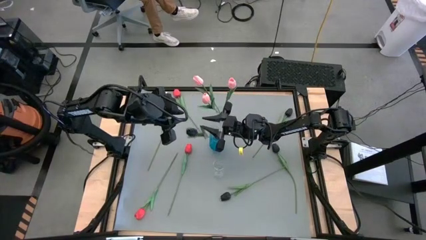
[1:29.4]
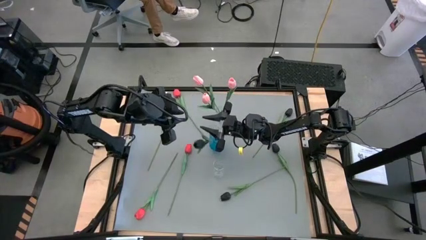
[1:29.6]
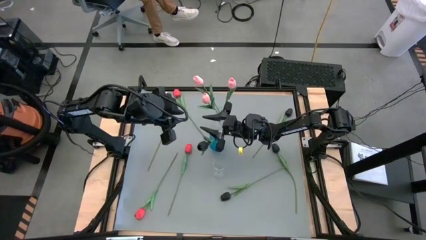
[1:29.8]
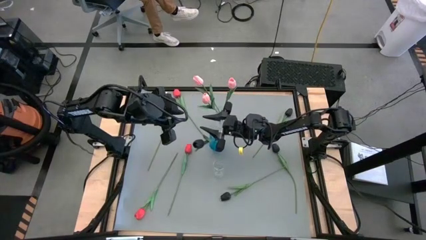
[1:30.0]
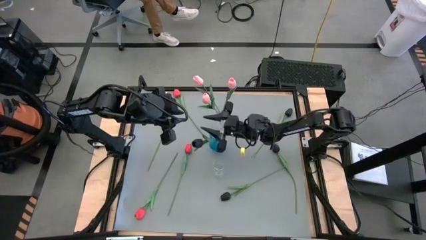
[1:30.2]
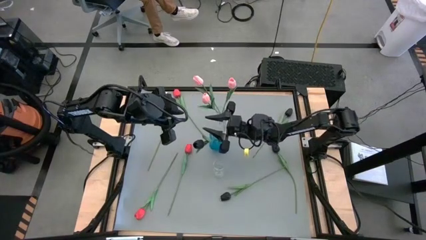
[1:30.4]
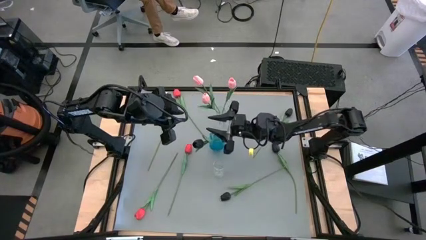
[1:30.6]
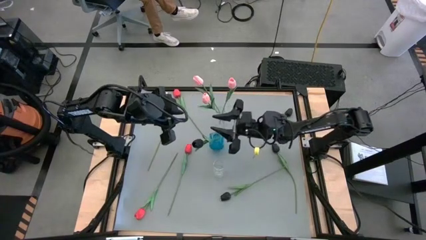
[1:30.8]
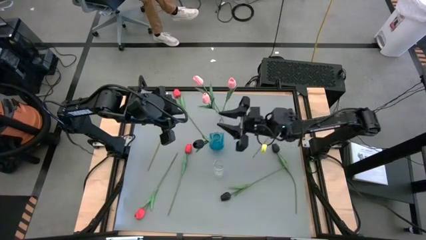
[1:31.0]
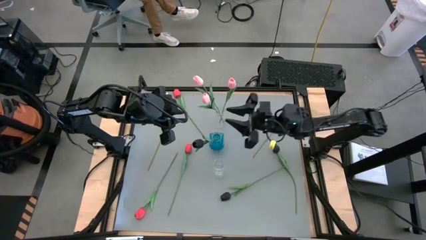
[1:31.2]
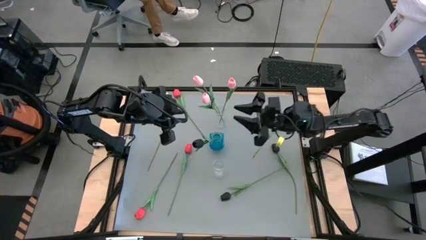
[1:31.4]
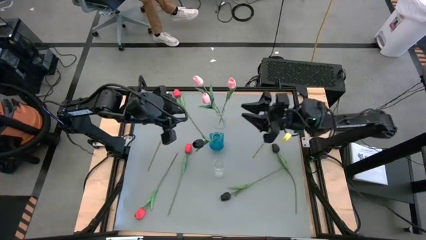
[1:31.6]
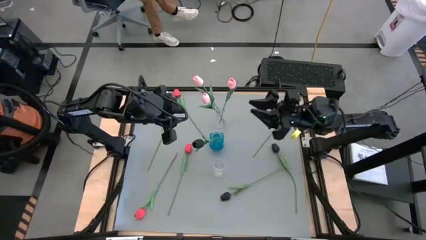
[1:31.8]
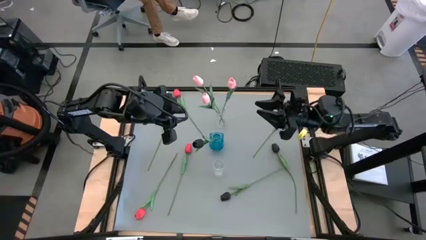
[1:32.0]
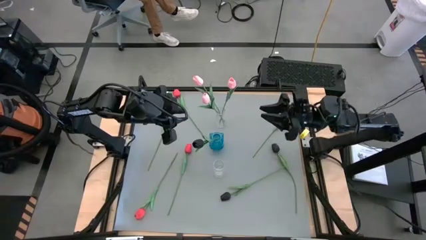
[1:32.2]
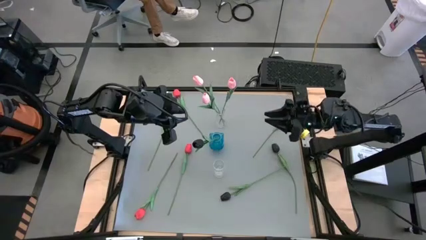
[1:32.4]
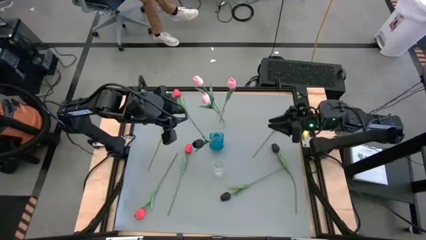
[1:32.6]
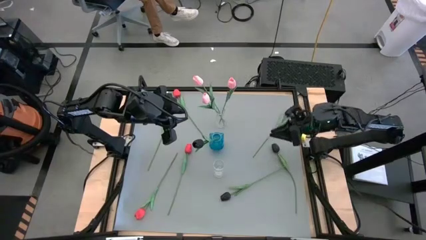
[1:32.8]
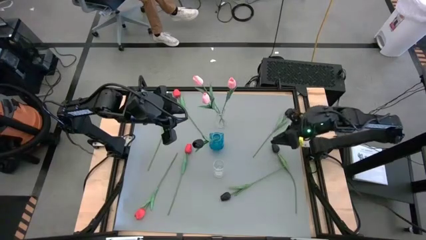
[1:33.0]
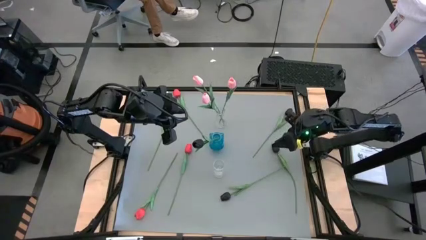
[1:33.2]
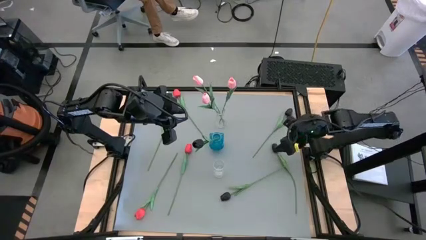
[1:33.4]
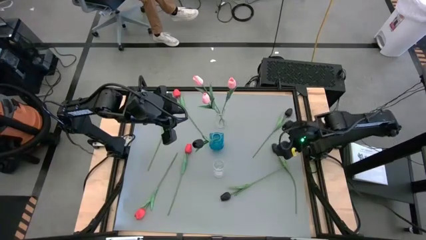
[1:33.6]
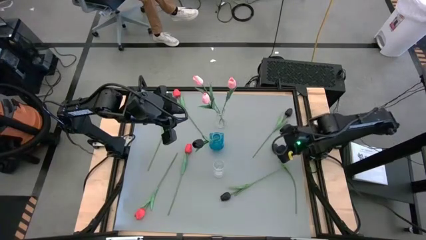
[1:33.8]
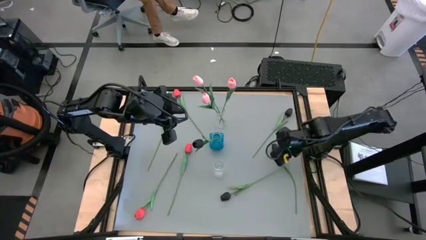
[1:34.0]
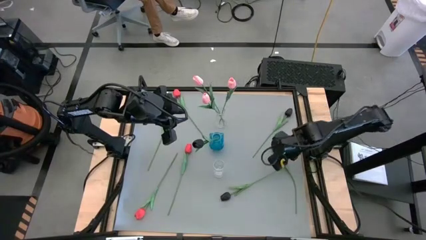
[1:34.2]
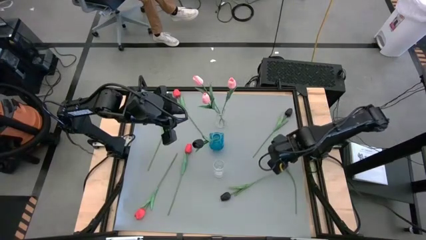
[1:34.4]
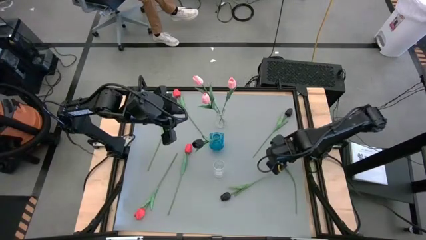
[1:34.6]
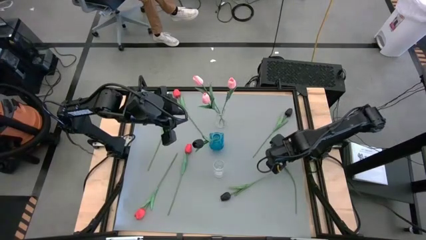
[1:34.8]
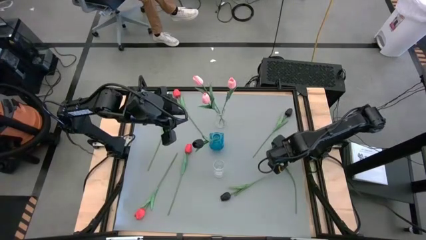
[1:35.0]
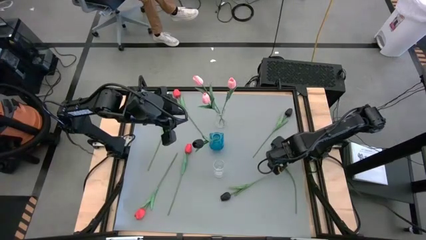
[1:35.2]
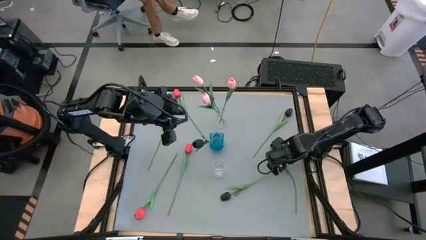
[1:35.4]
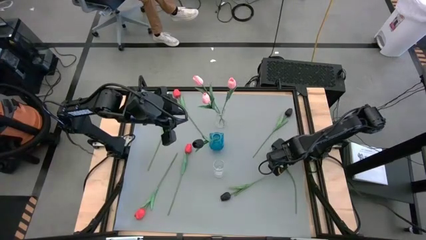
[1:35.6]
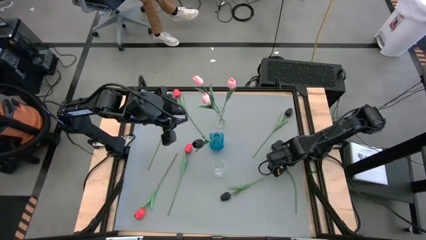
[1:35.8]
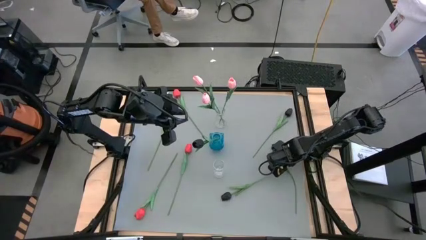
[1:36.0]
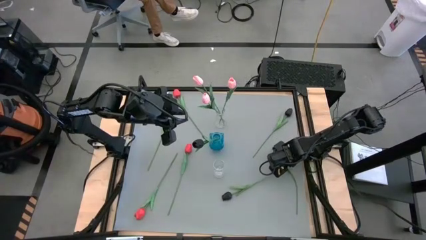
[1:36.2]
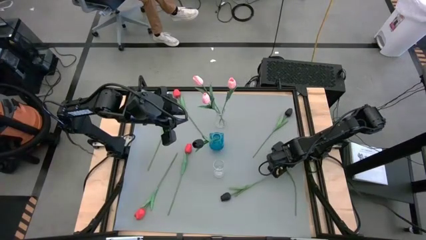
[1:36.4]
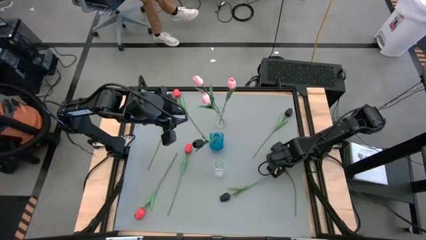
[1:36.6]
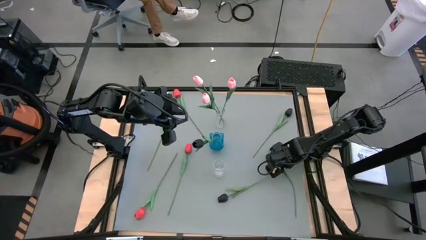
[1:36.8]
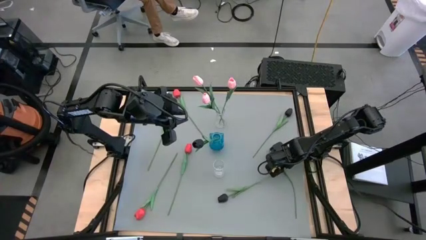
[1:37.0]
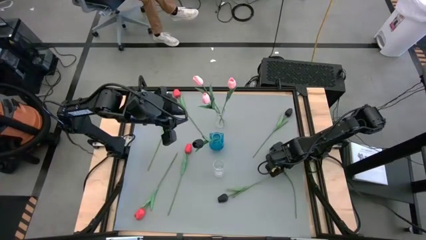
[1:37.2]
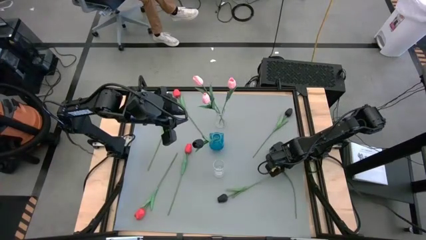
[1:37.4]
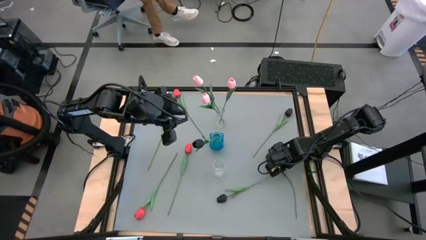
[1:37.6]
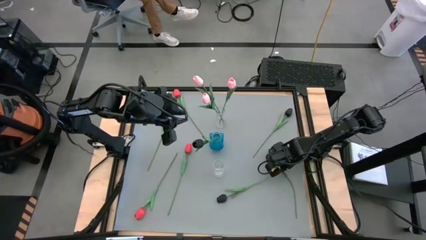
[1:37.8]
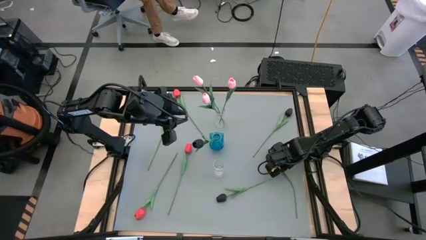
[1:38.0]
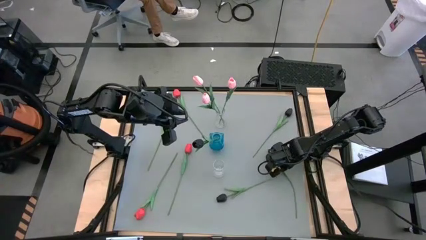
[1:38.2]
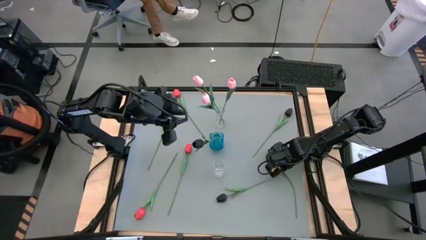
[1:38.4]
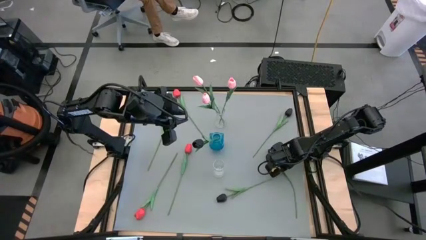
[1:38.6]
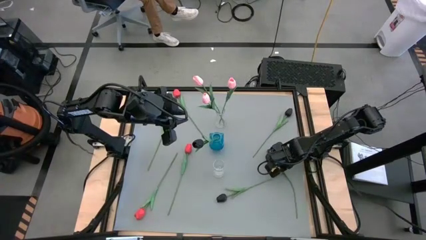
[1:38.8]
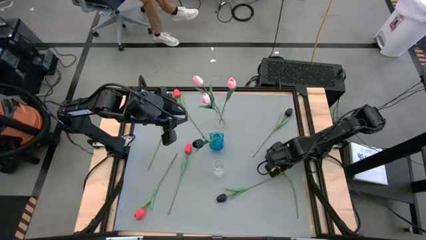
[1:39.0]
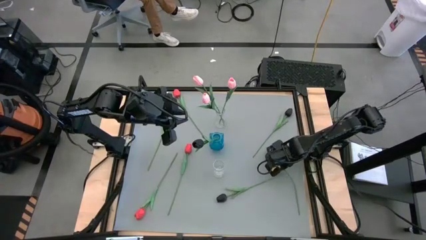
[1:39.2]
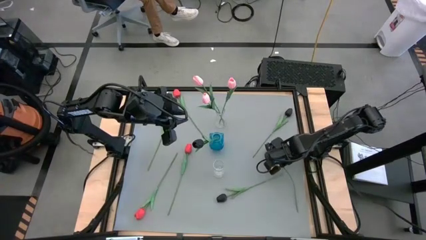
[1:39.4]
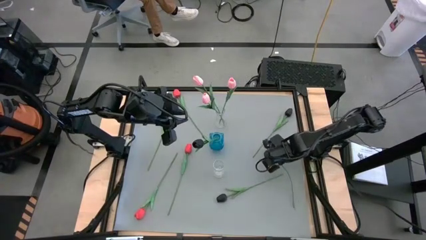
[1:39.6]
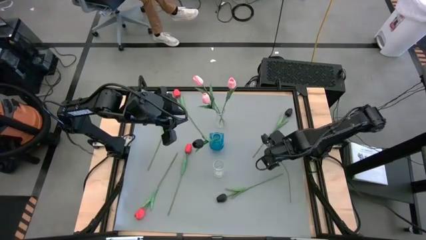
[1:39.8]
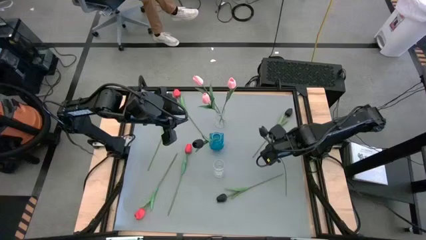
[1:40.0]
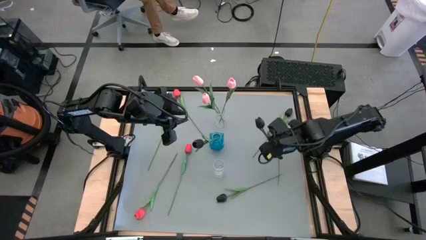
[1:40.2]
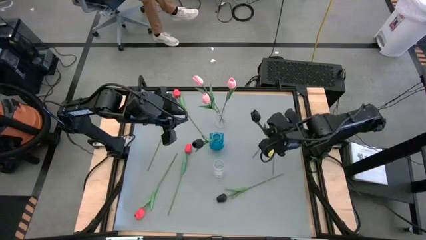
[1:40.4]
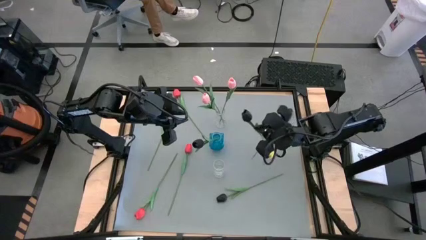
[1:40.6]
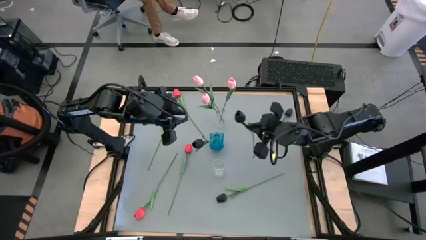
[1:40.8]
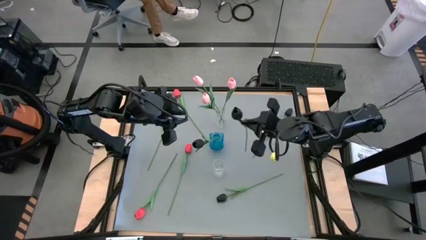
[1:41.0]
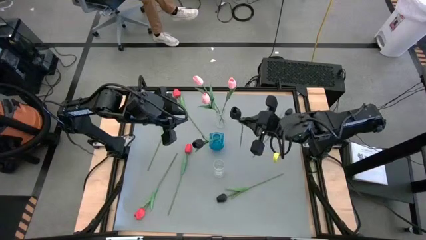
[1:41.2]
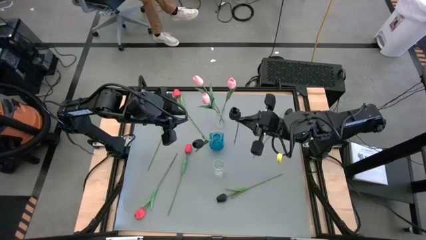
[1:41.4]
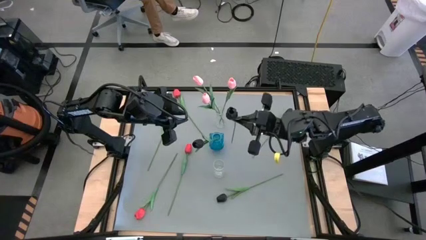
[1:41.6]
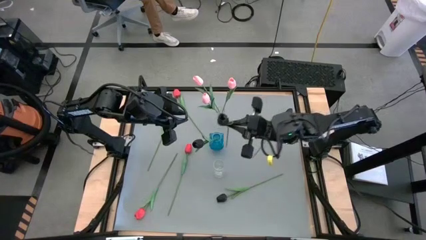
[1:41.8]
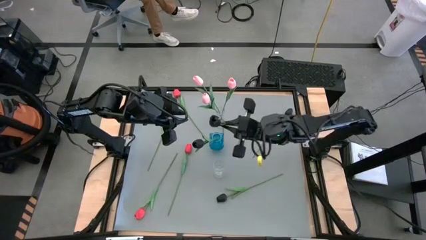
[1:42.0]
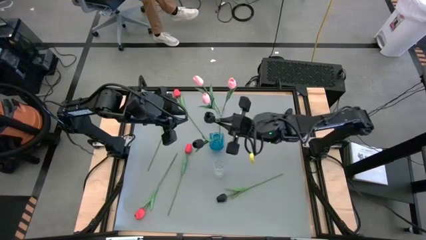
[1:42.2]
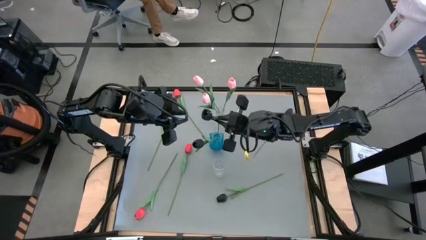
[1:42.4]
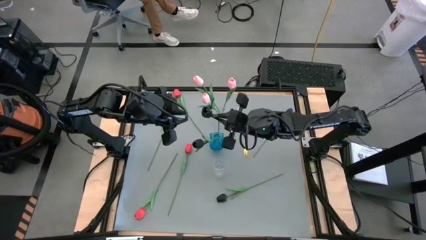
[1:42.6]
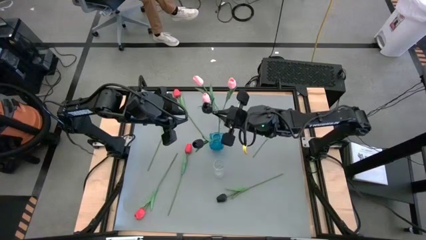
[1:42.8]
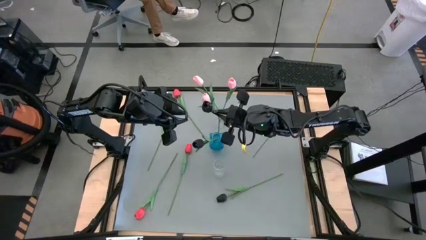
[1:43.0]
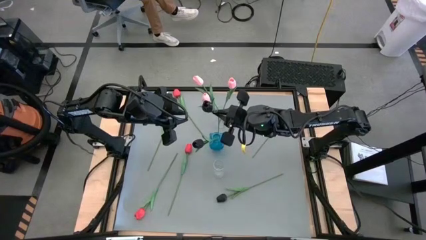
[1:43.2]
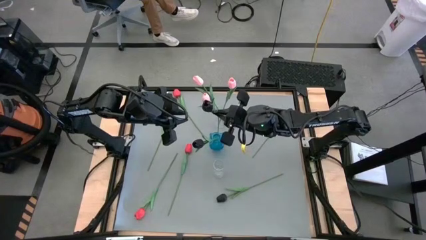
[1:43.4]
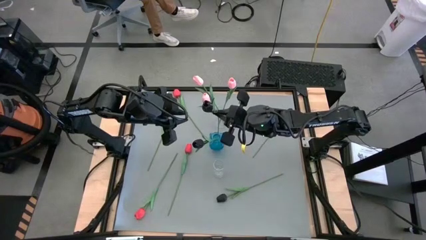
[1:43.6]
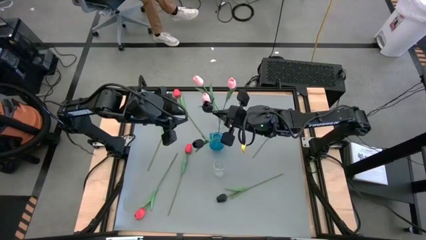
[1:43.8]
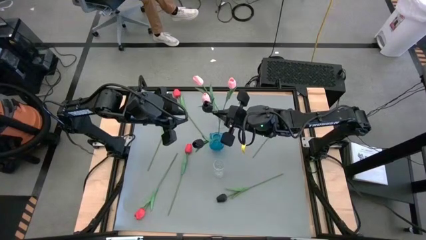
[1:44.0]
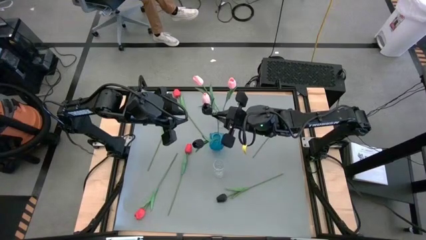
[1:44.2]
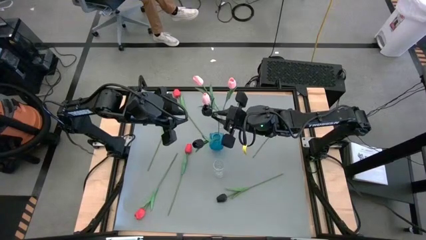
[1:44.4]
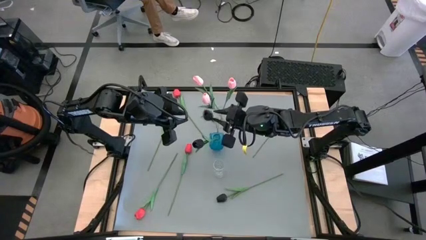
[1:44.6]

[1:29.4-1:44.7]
Task: Sort flowers into vase by color
Put the bottom right black tulip into the blue vase
